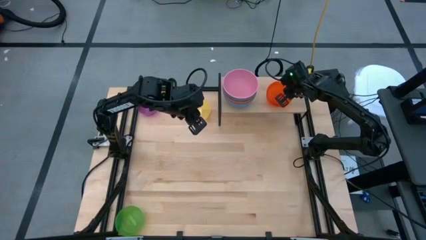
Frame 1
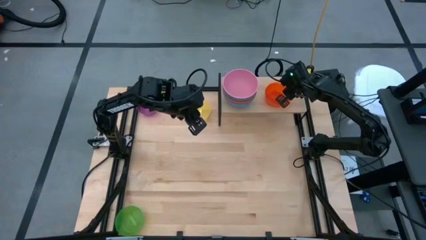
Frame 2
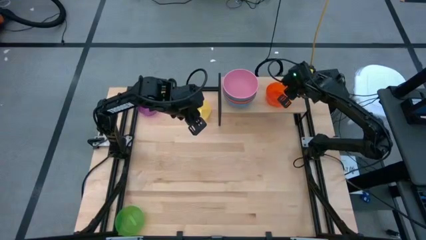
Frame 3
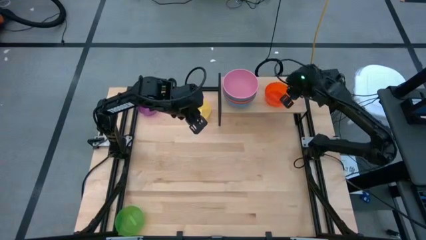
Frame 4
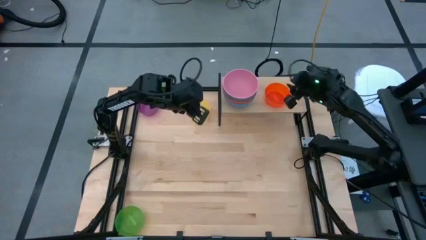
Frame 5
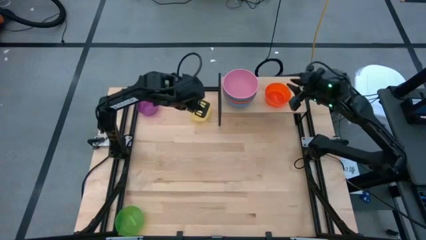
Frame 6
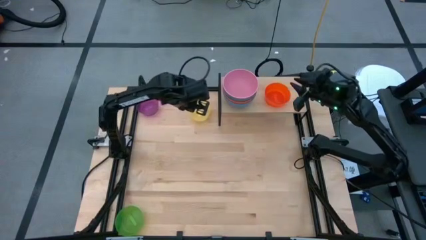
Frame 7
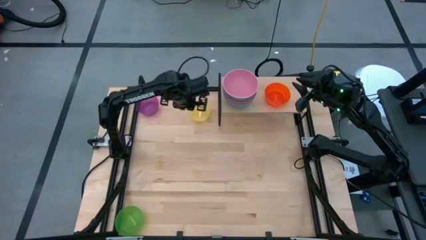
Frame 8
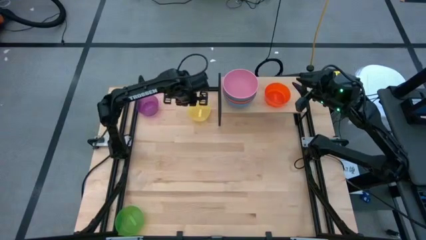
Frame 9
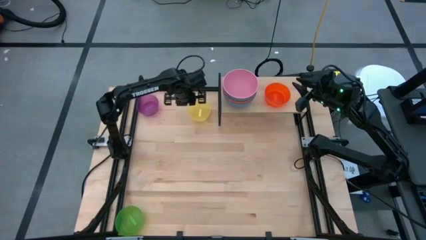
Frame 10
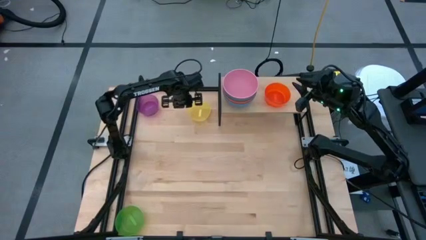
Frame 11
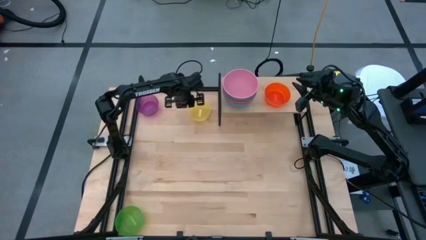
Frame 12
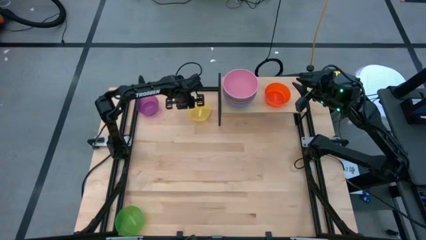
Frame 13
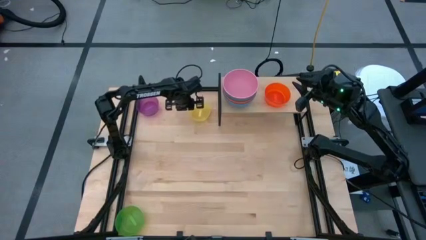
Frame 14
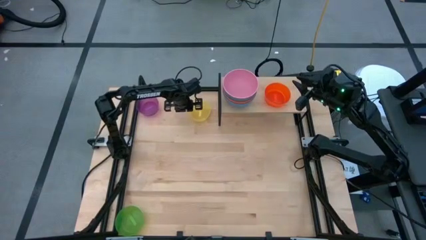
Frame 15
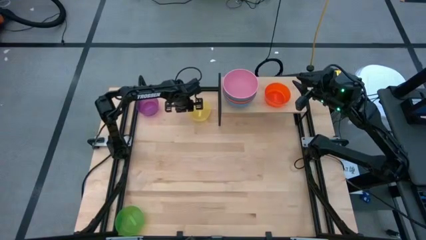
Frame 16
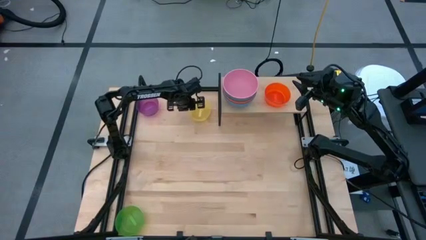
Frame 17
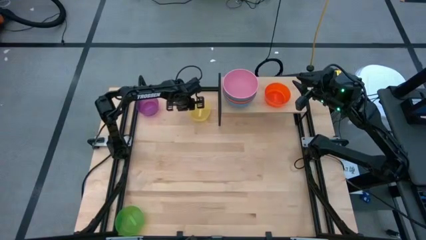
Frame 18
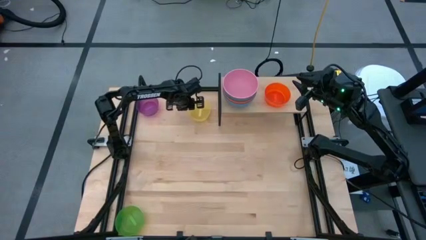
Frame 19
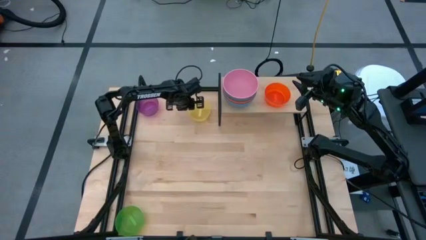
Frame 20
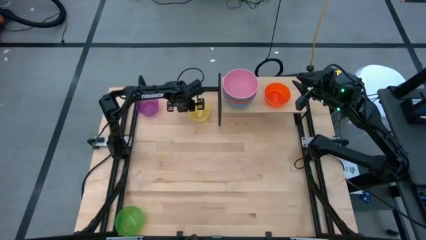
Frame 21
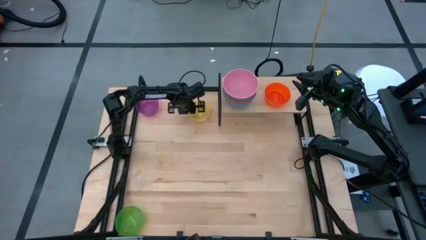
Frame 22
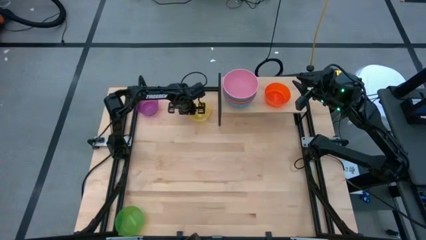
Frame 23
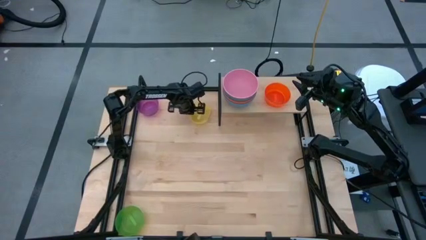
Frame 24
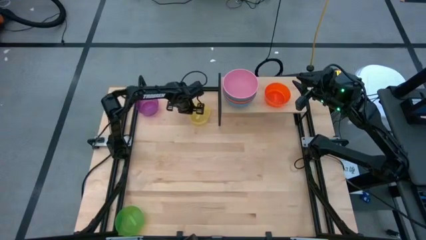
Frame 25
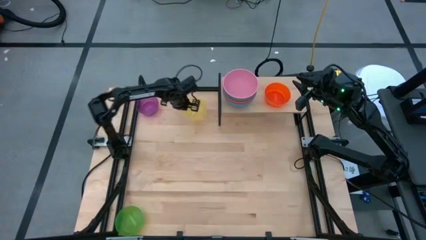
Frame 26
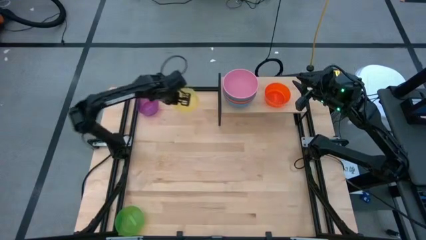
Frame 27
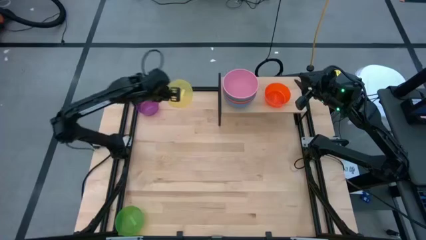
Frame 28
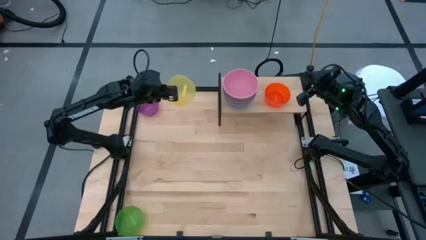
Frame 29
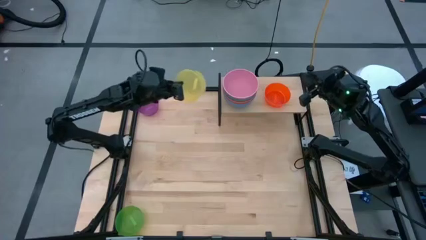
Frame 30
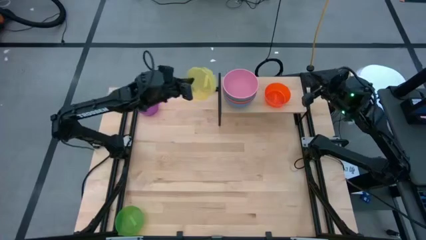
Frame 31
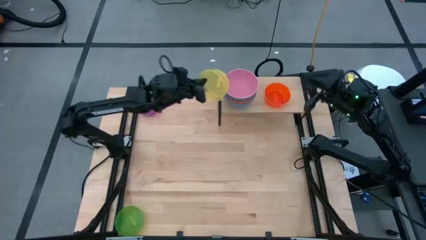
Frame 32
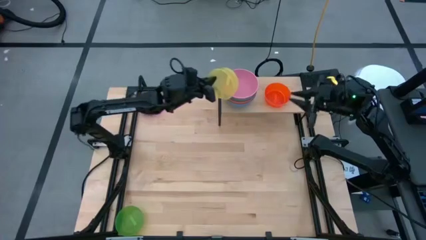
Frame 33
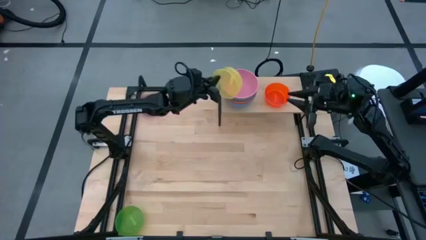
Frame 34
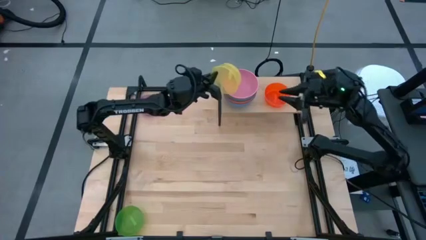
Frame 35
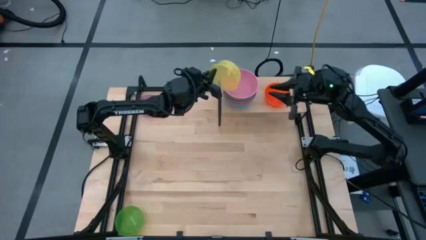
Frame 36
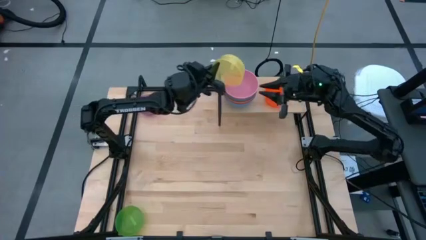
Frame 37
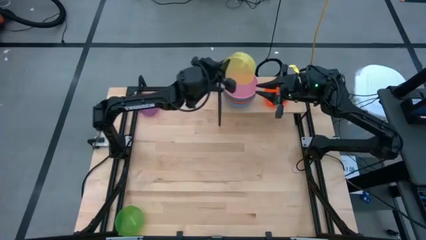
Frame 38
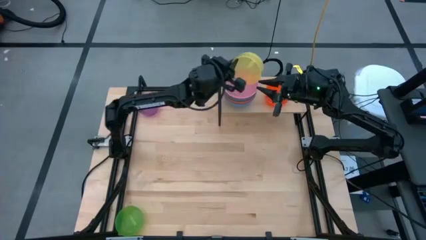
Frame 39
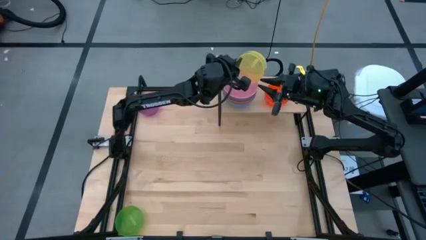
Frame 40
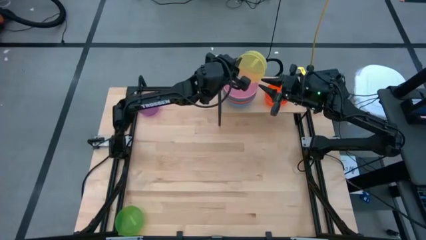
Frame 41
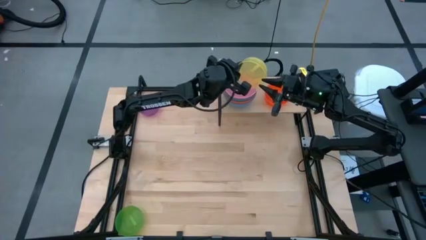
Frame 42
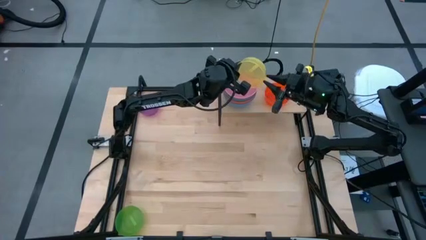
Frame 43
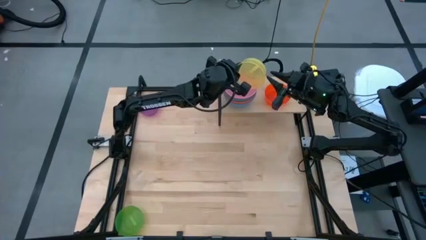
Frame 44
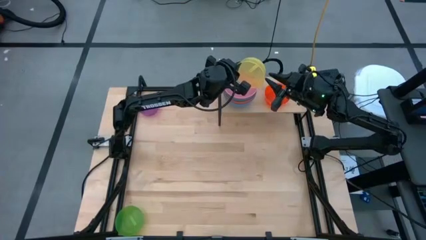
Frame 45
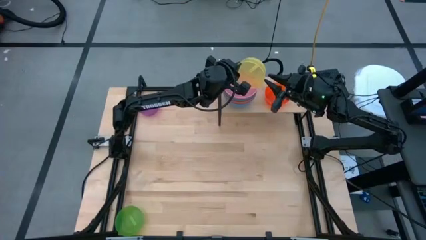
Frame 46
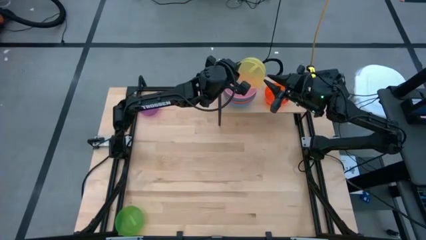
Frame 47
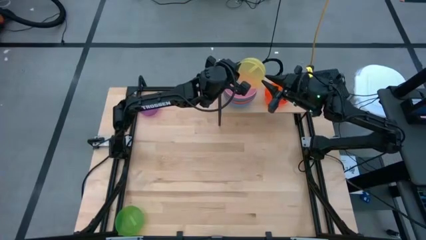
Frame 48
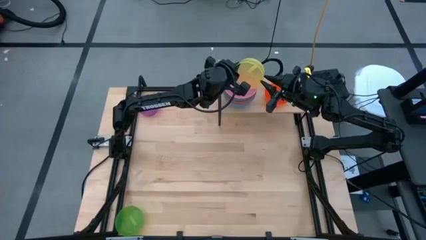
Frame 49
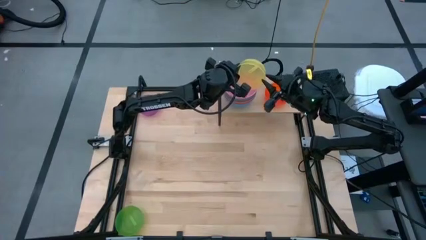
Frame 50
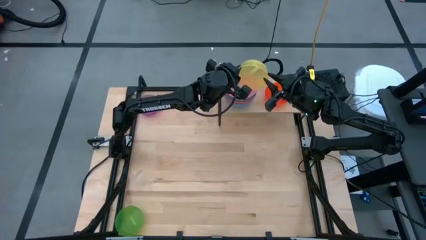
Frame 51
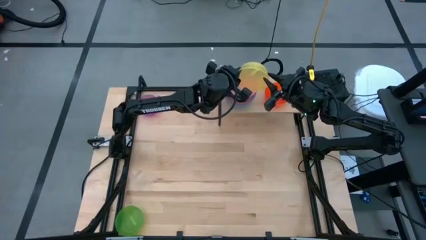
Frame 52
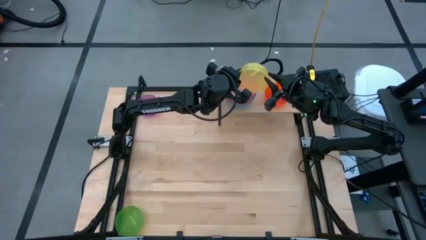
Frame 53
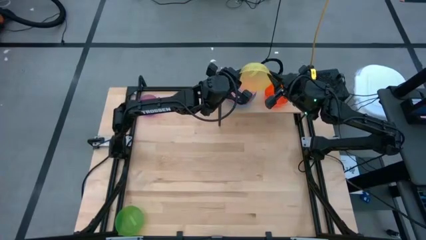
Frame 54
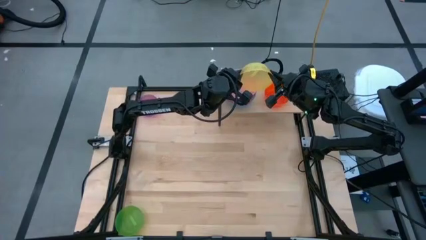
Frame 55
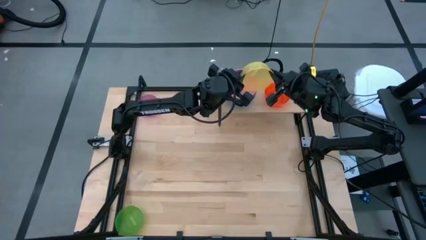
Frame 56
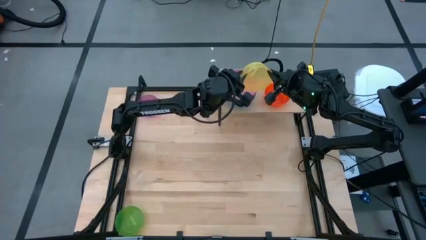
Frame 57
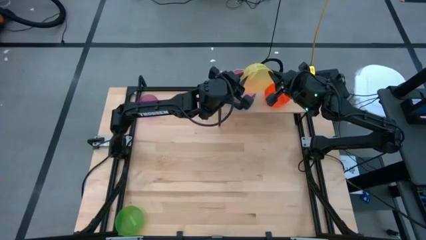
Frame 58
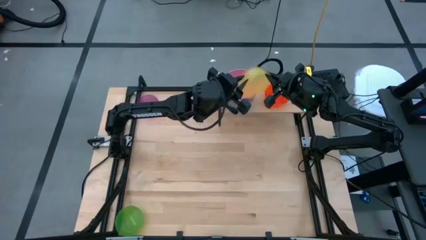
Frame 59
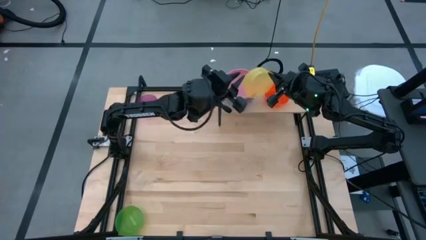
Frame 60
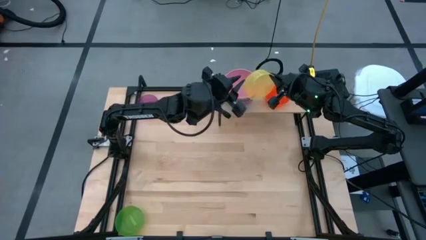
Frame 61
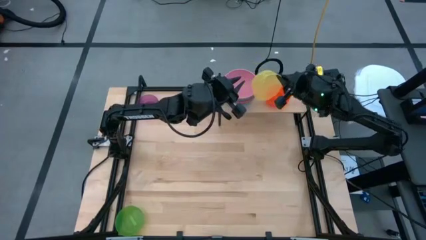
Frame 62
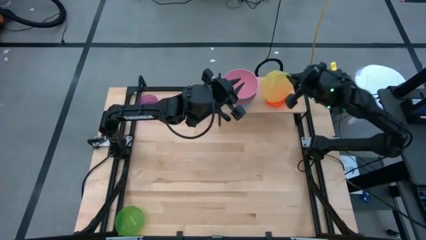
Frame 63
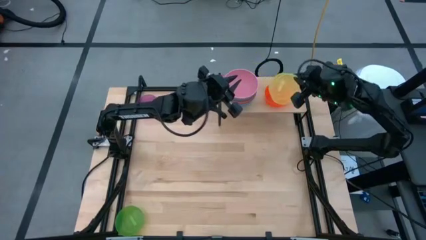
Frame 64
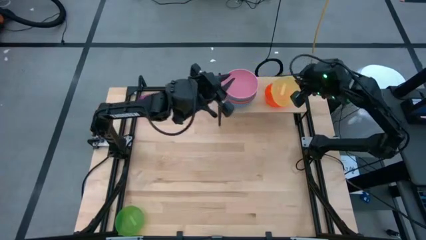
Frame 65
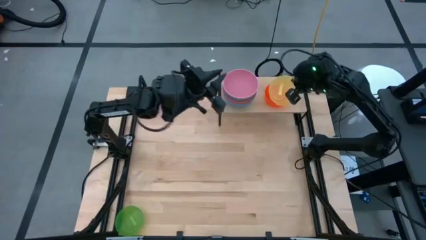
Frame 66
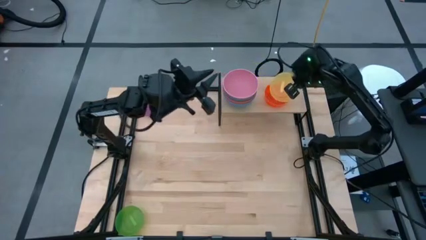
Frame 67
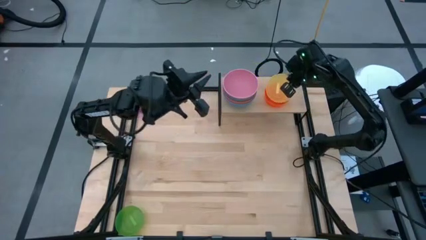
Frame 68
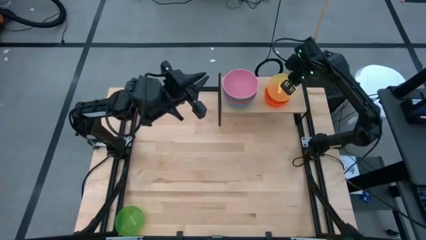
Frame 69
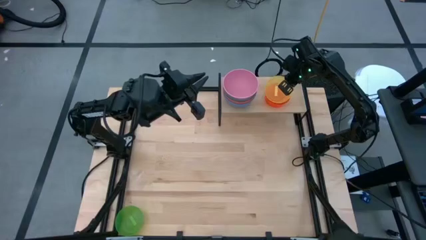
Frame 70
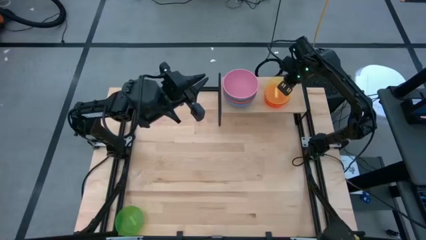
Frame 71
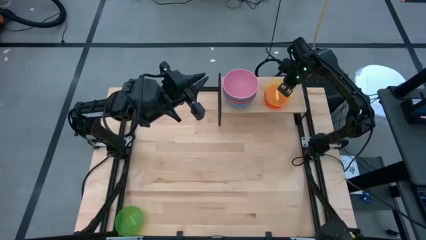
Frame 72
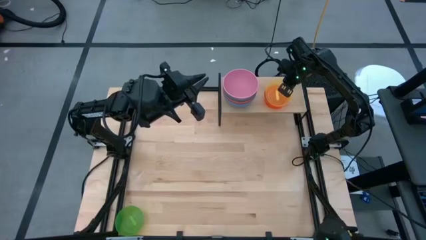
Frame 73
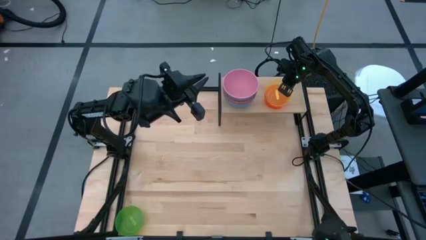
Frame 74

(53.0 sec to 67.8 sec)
Task: Place and stack bowls onto a shelf
Stack the yellow bowl on the shelf
